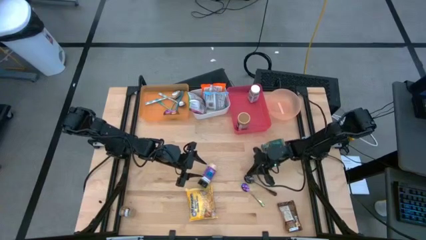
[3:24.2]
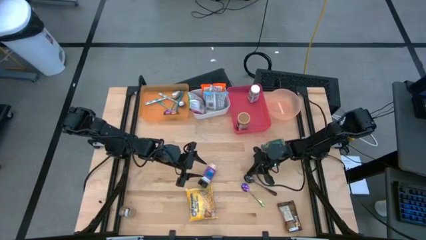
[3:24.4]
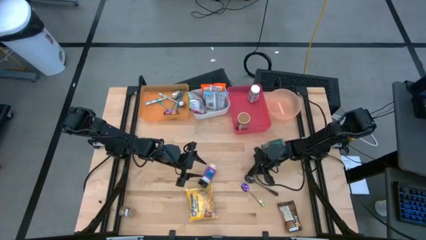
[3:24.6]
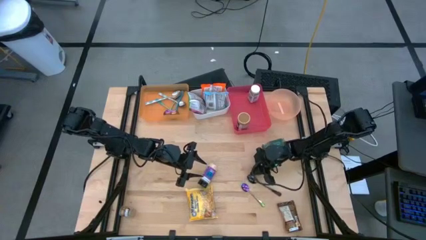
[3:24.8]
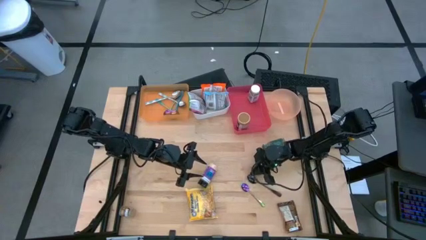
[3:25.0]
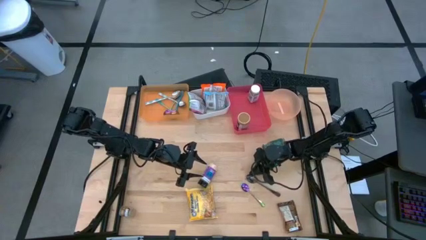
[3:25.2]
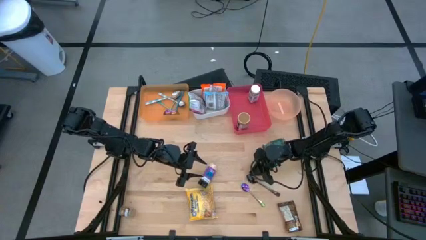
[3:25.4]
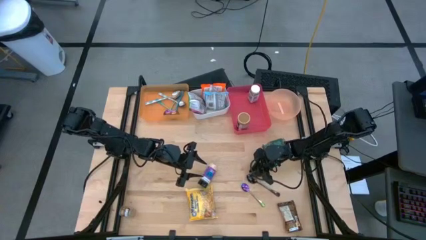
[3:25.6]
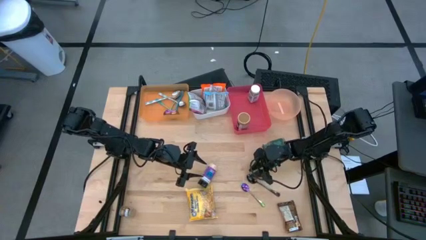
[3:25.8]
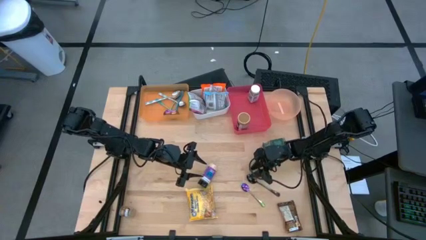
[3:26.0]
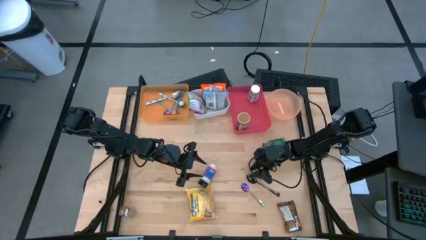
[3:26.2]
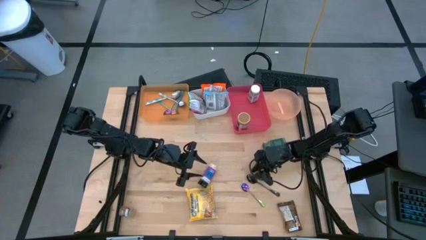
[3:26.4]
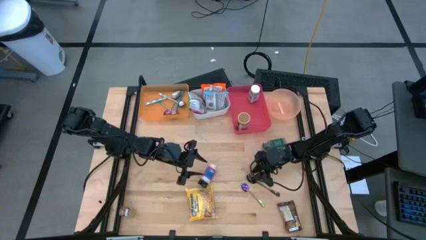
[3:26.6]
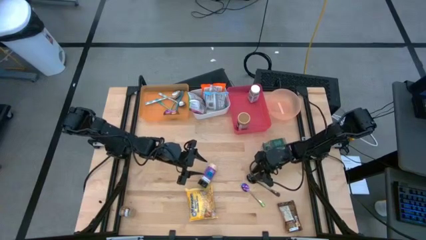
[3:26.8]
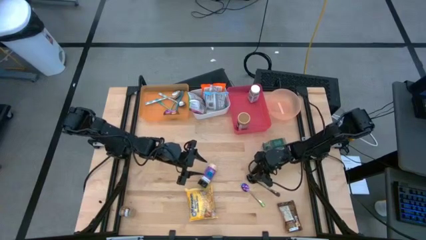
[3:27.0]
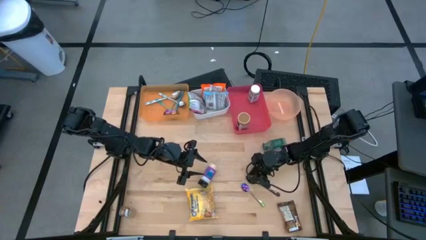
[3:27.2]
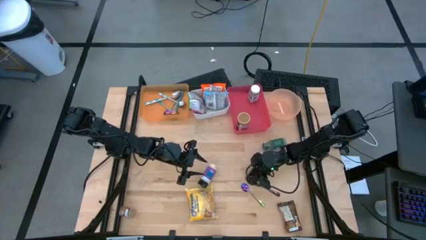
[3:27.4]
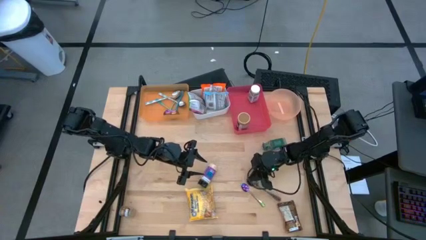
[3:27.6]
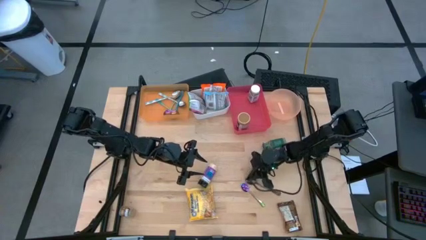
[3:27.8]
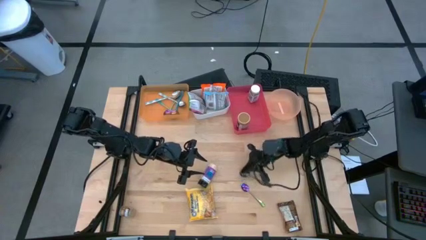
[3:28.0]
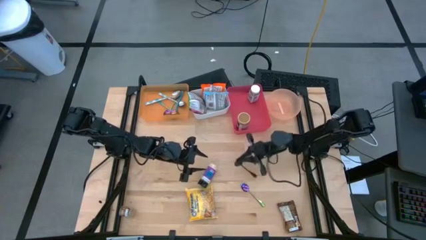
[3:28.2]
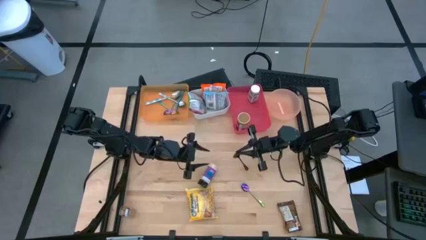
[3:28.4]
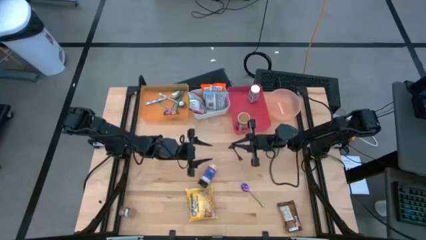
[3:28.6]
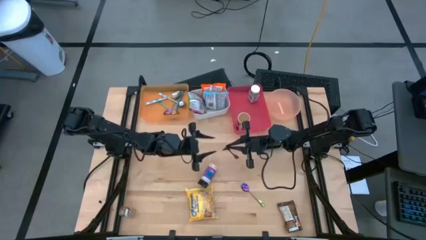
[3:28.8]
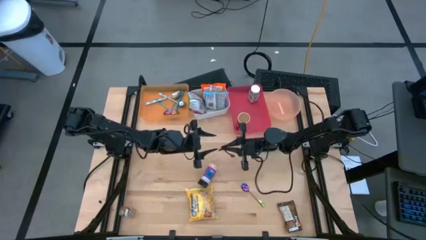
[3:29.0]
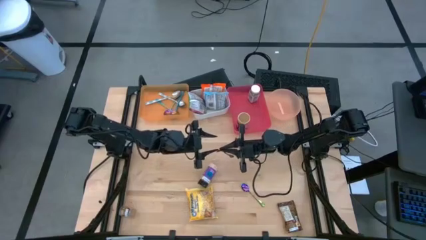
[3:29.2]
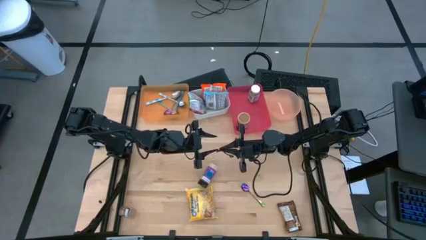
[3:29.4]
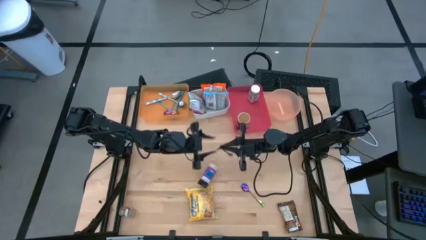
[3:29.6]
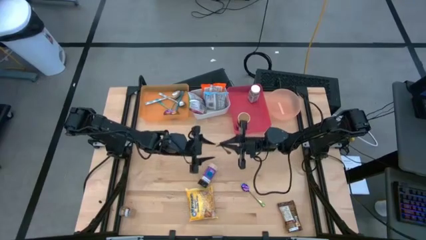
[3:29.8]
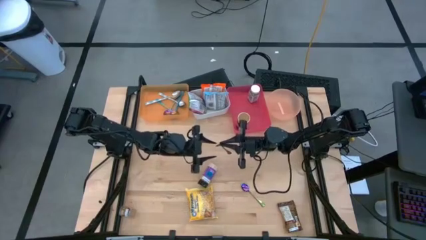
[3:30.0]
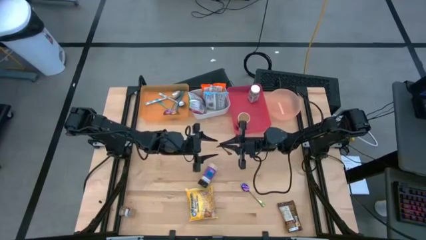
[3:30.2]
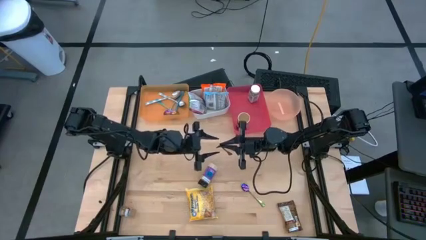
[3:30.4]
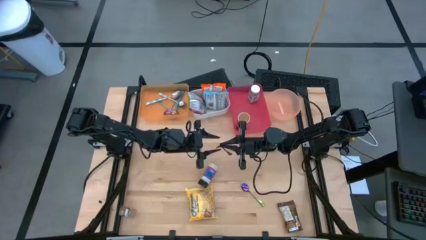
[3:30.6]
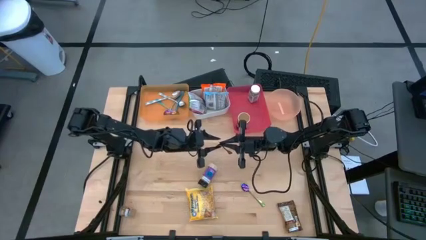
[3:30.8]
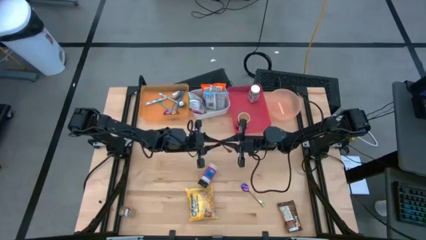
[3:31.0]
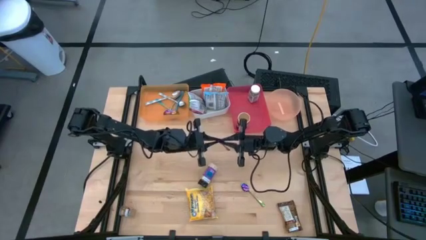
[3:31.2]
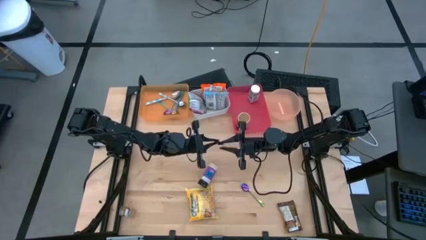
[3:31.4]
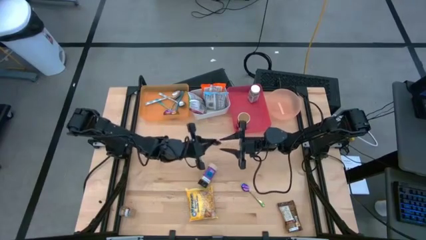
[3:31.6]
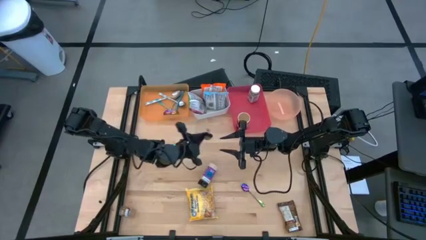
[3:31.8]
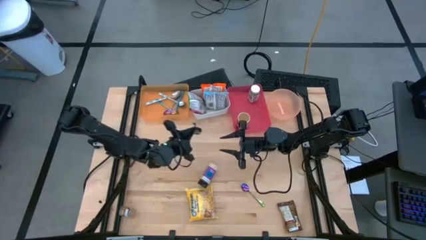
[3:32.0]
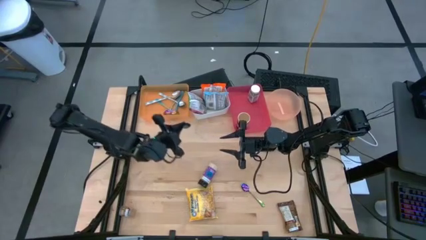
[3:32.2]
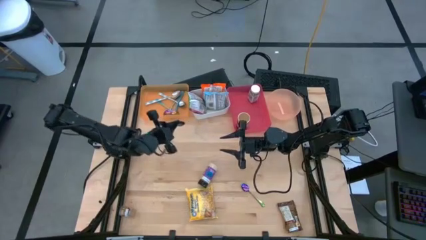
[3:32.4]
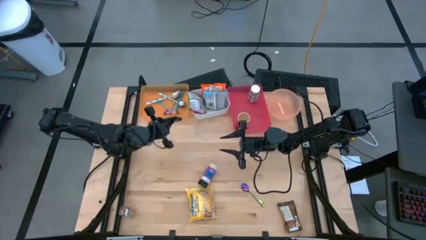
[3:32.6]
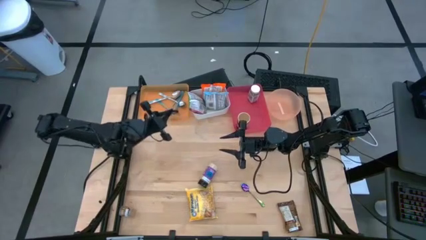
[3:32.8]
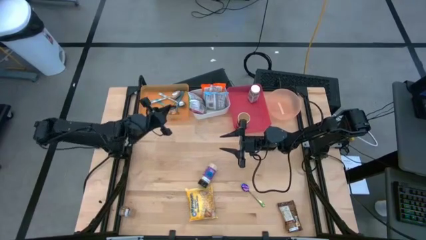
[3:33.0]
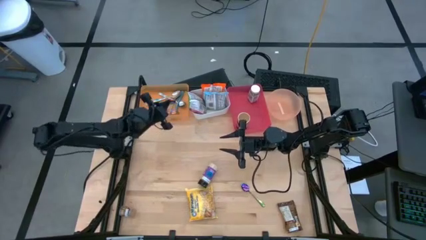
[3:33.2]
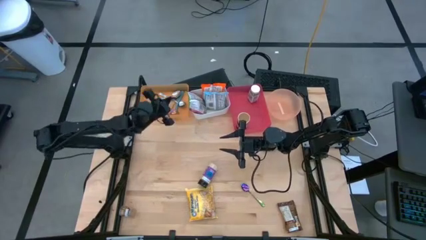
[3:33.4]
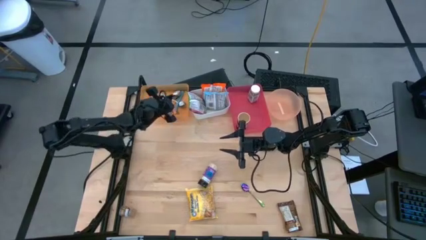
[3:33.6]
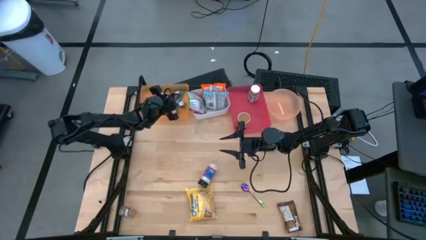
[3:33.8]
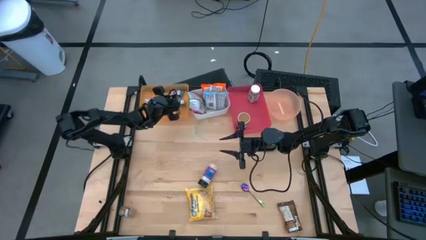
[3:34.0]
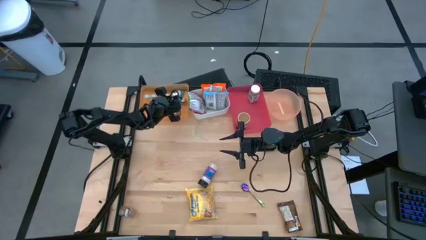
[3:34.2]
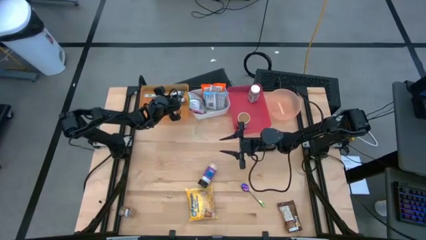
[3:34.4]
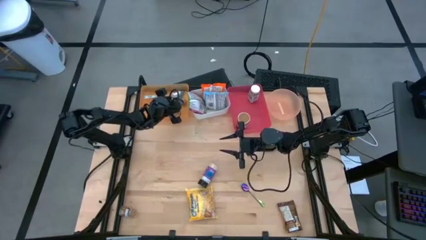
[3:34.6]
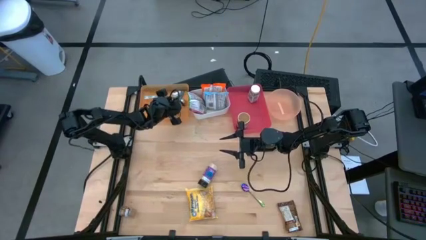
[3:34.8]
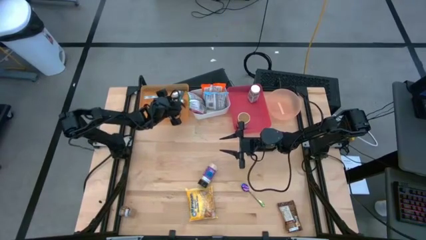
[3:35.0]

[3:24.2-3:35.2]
Task: Pick & Place Food Item
Put the black spoon into the orange bin
